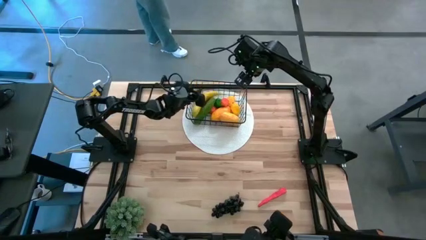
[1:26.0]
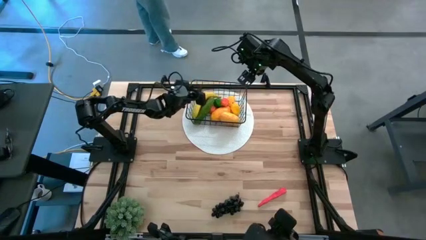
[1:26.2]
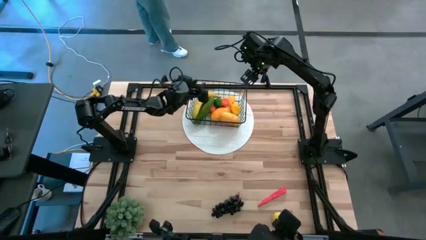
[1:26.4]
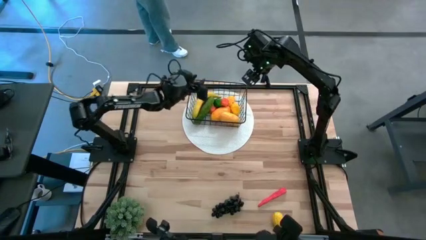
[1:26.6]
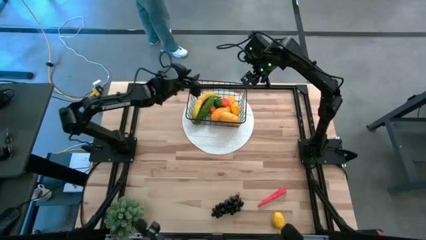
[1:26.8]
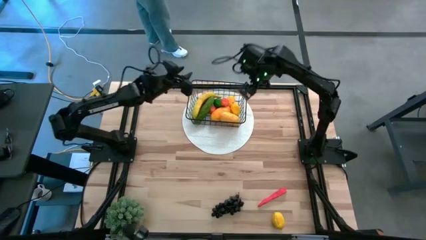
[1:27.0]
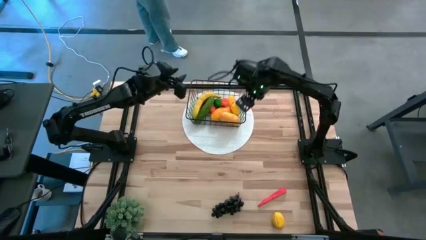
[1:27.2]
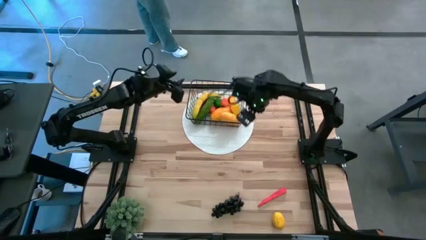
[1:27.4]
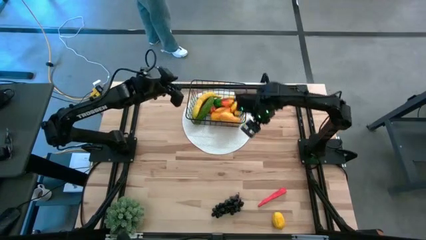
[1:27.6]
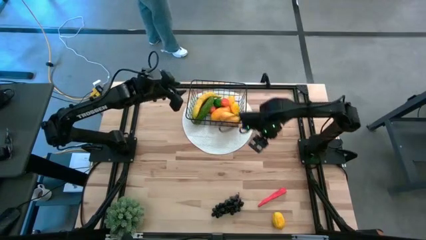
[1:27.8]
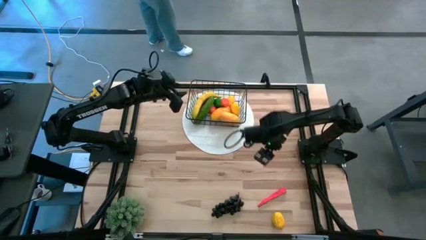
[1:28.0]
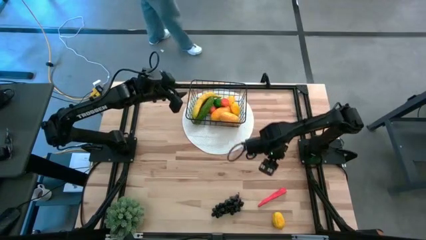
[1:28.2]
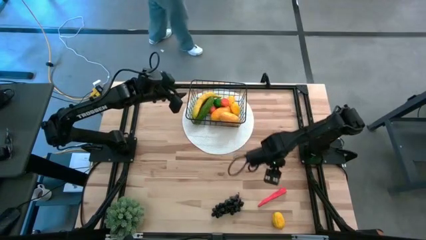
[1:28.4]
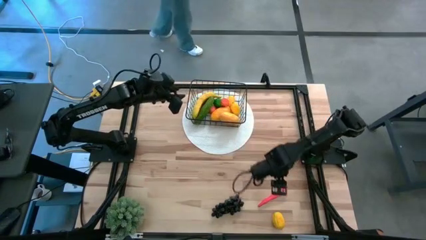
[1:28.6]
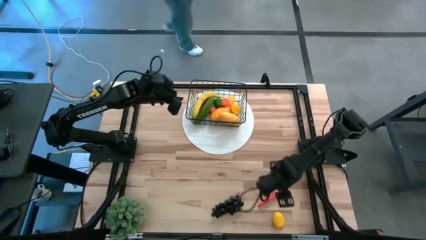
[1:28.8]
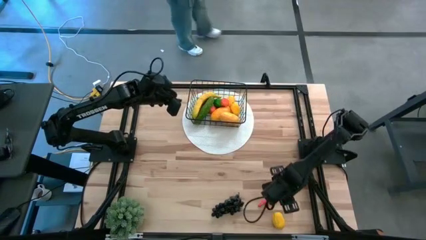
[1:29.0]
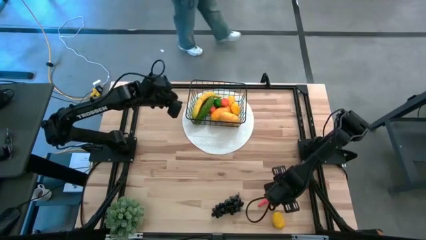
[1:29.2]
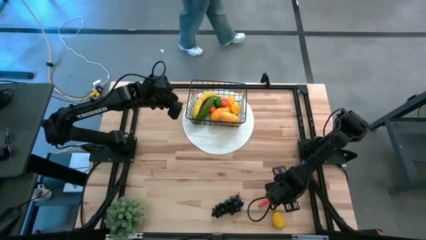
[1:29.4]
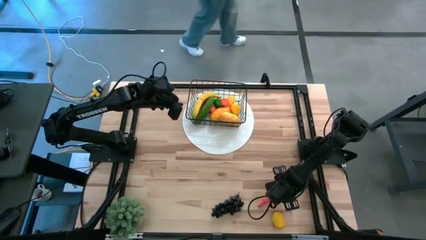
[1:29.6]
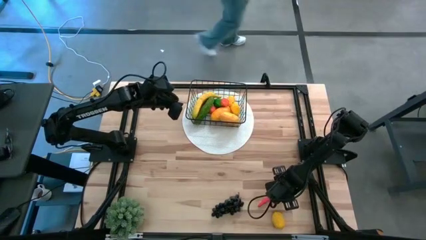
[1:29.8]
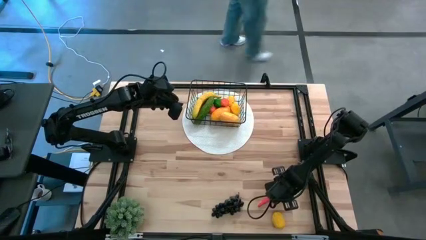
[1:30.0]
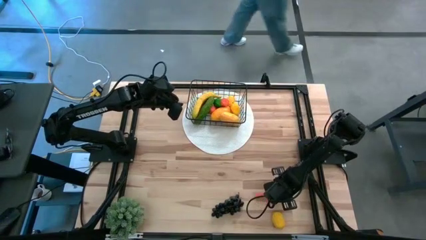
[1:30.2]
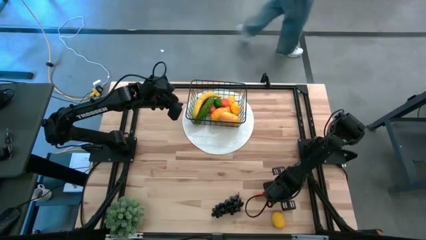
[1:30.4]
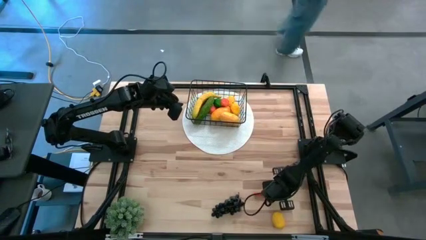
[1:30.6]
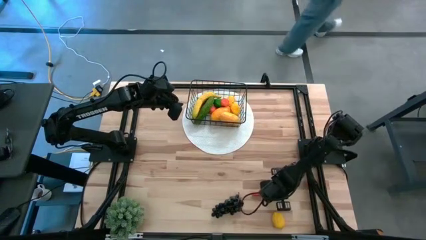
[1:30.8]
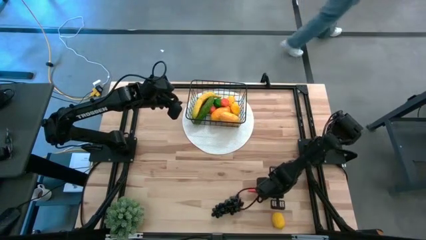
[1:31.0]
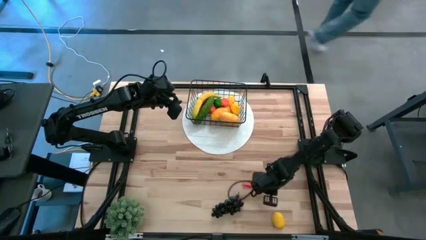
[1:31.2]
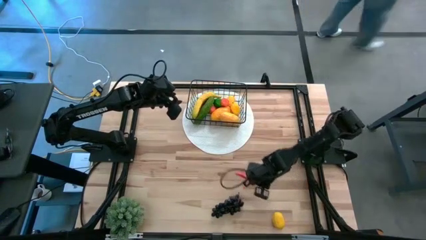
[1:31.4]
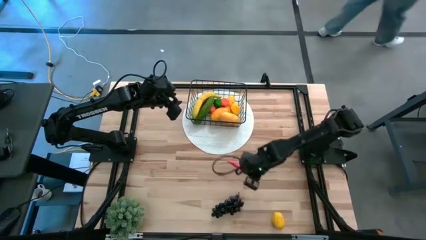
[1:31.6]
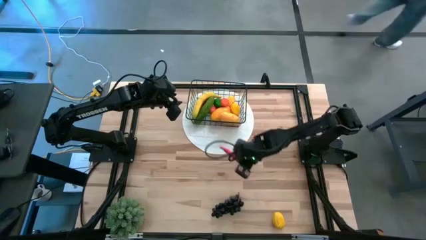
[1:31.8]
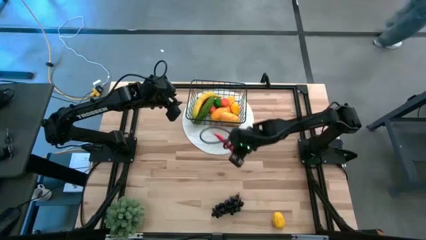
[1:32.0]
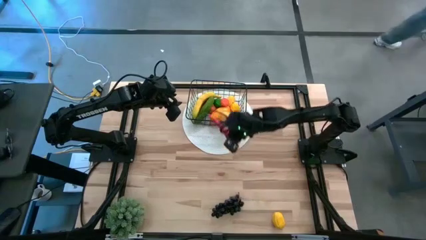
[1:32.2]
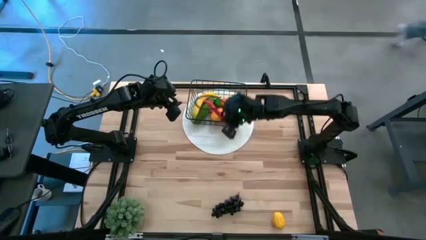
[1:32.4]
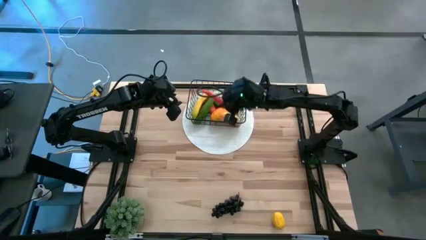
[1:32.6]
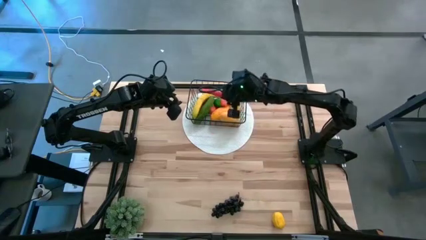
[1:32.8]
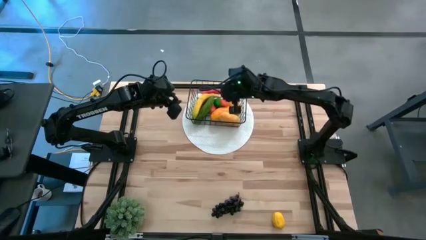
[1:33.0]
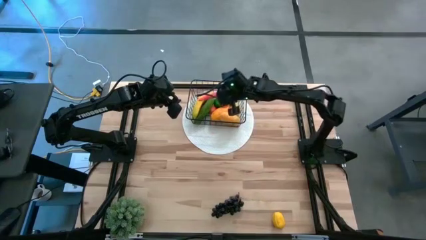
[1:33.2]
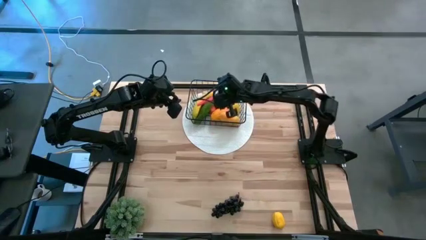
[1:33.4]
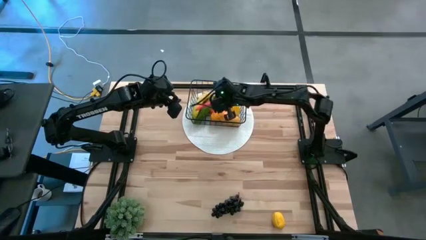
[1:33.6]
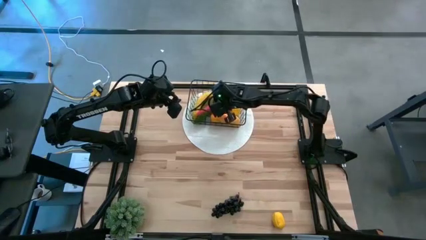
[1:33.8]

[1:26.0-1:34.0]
Task: Build produce basket
Put the carrot into the wire basket

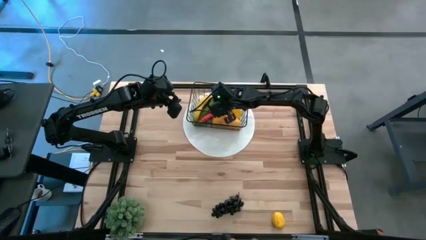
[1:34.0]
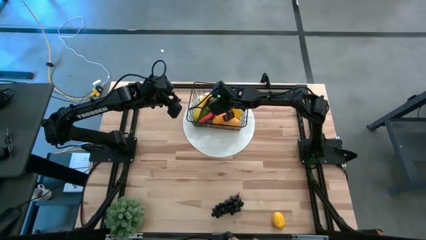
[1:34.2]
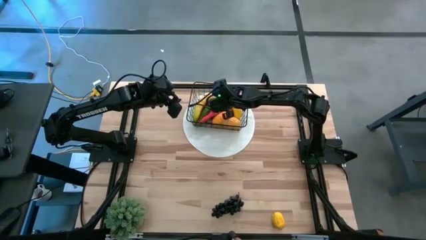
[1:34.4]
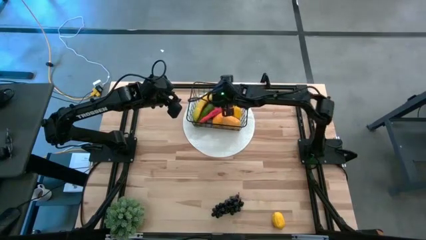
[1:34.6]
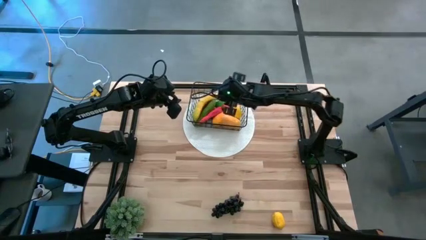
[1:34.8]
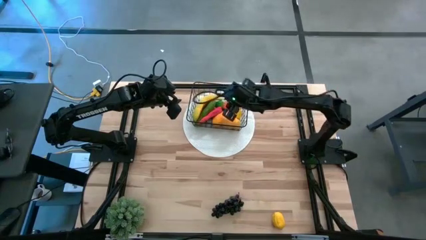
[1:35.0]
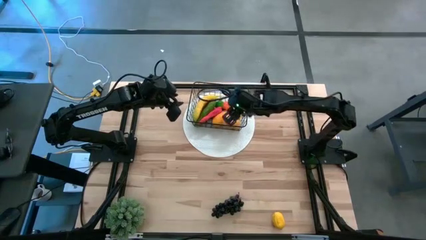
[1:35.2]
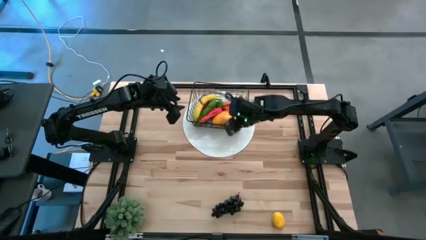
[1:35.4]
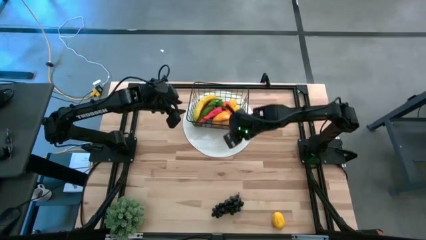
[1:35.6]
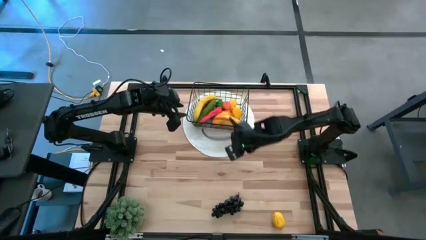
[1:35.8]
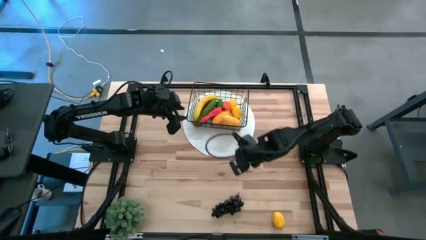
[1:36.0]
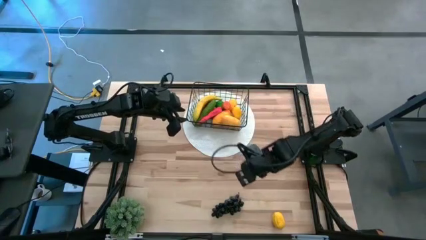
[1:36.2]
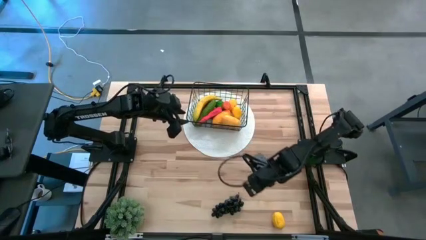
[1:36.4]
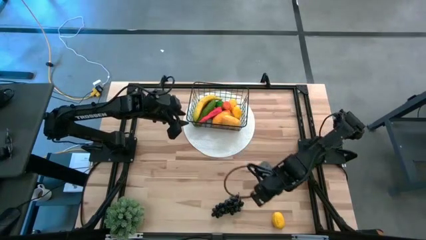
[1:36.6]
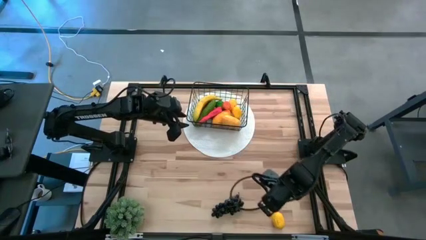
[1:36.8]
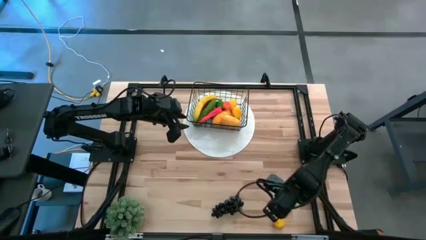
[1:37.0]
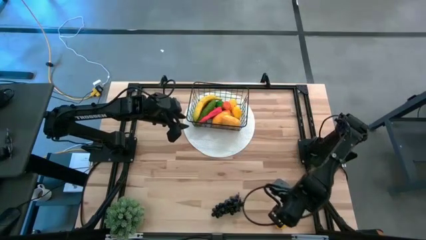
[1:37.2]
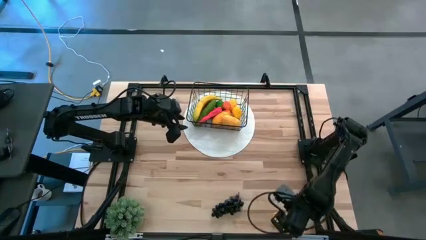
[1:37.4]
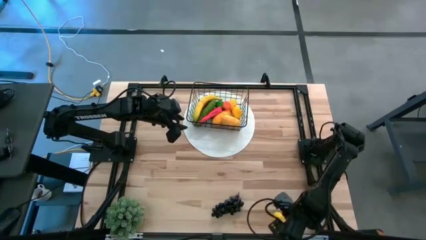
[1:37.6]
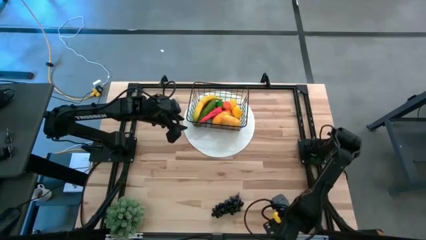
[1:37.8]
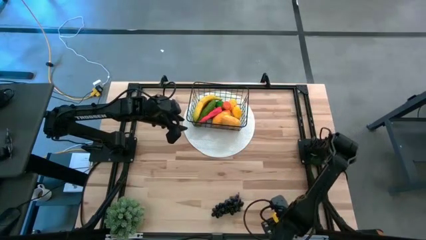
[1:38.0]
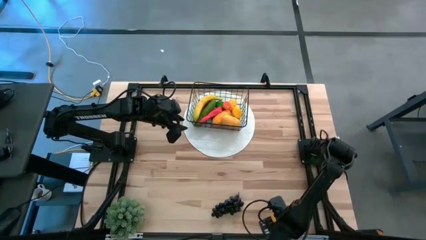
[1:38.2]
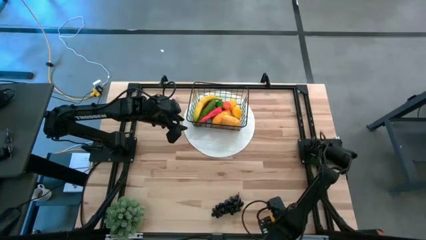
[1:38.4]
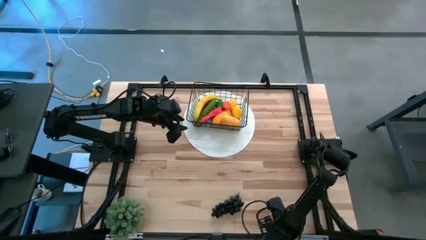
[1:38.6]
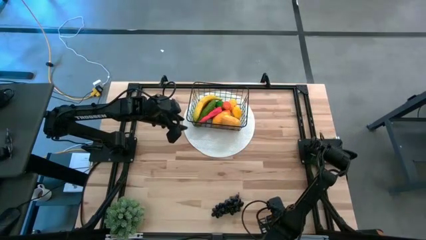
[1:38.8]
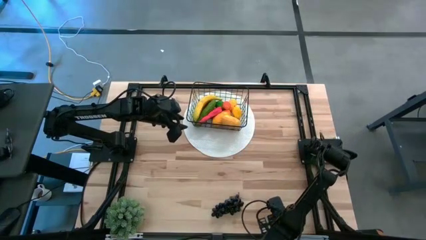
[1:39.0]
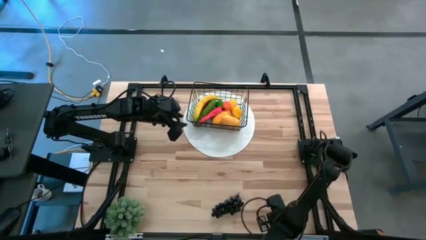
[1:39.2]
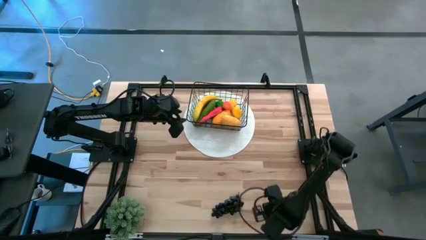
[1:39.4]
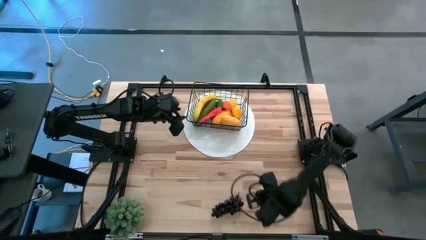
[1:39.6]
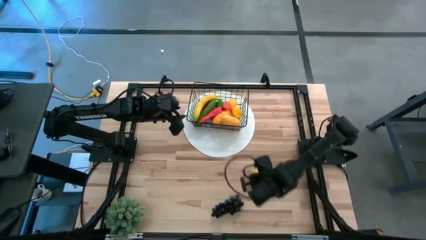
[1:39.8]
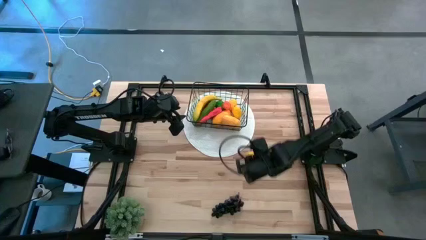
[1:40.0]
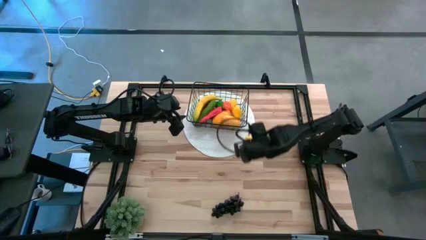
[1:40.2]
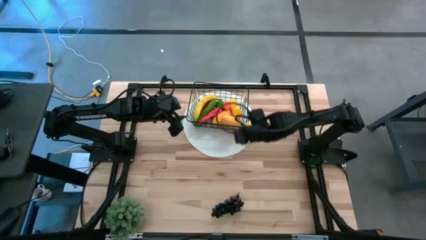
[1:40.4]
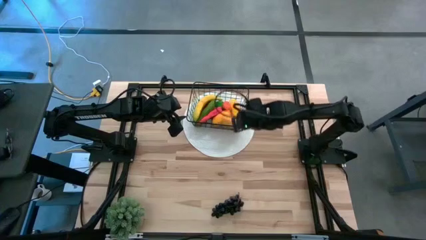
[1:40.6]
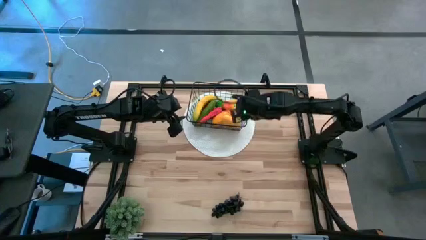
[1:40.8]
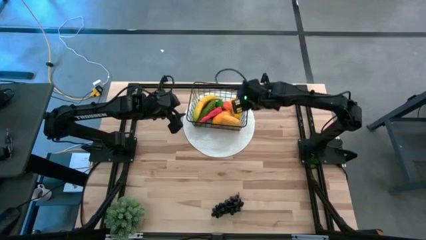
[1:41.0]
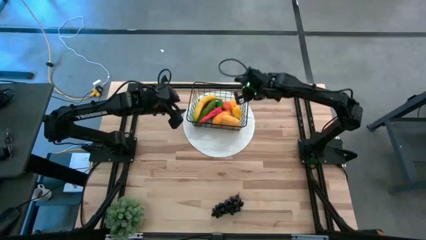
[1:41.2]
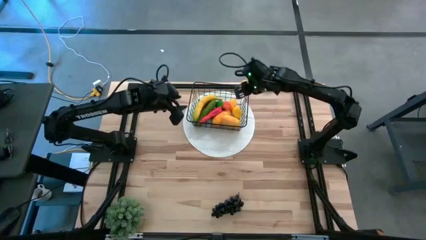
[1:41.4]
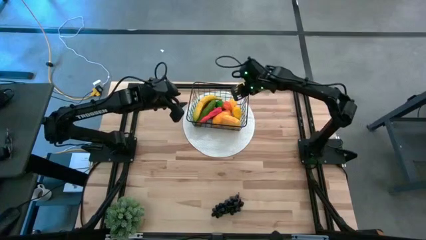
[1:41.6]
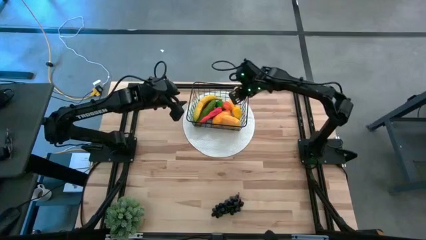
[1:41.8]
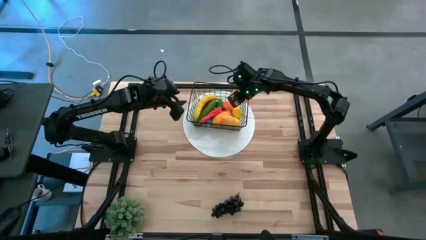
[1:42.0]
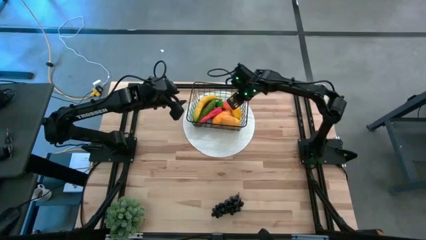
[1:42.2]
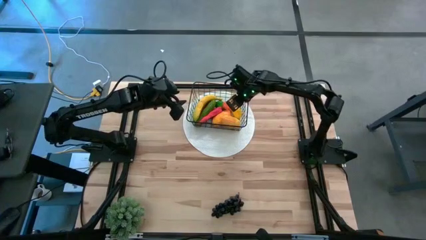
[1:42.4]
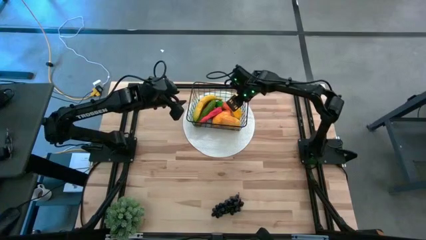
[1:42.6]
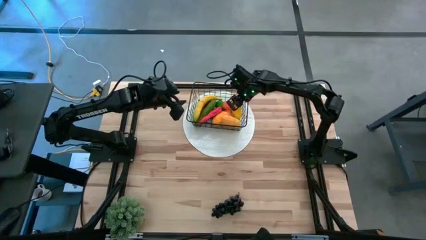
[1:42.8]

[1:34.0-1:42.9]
Put the lemon into the wire basket
